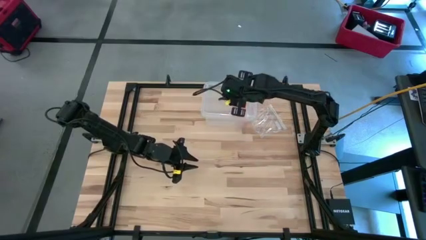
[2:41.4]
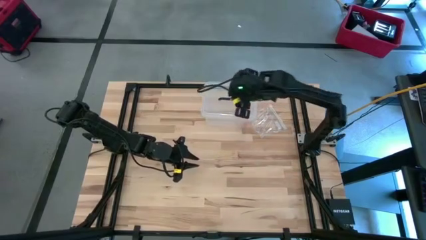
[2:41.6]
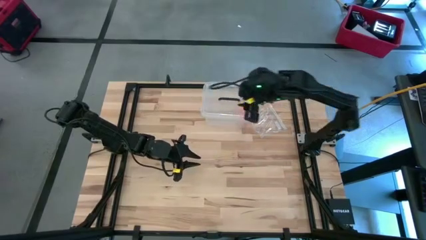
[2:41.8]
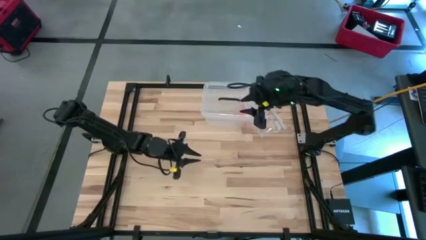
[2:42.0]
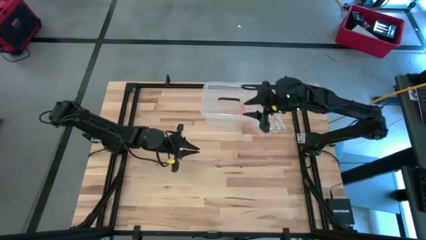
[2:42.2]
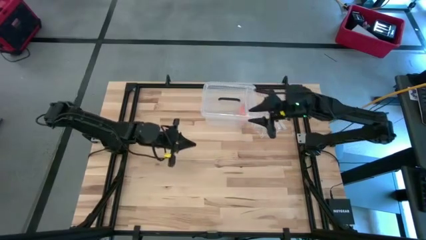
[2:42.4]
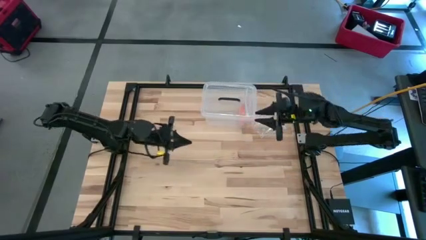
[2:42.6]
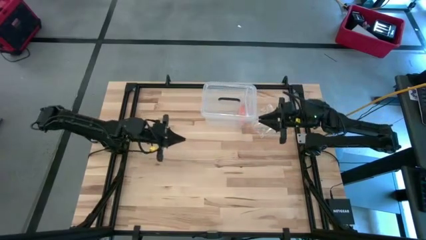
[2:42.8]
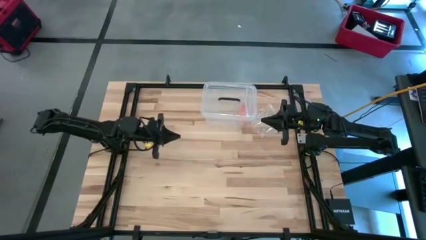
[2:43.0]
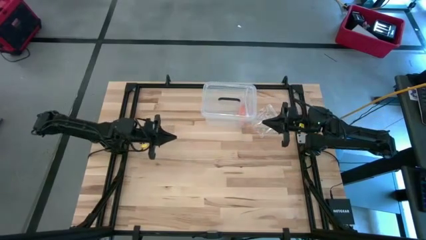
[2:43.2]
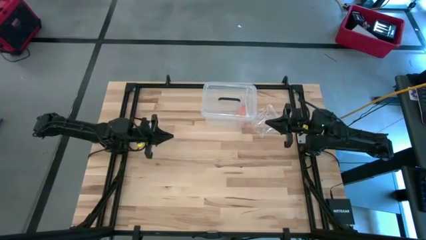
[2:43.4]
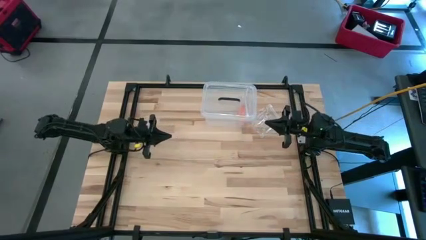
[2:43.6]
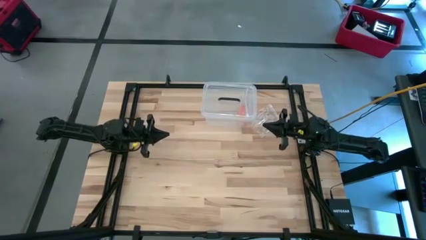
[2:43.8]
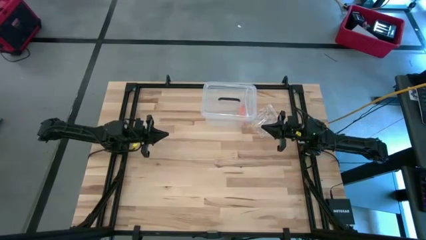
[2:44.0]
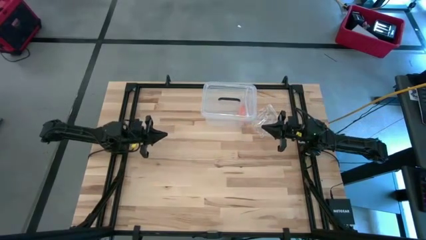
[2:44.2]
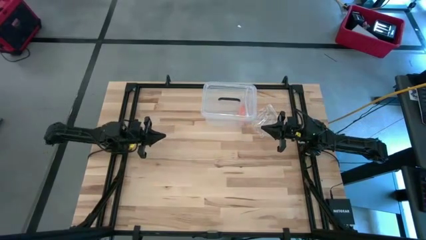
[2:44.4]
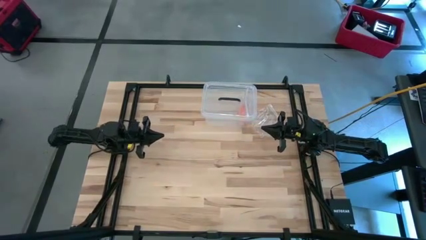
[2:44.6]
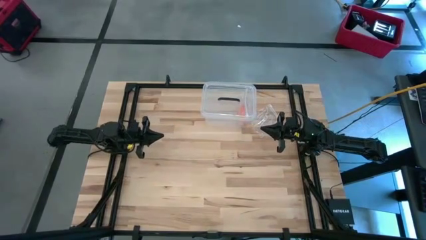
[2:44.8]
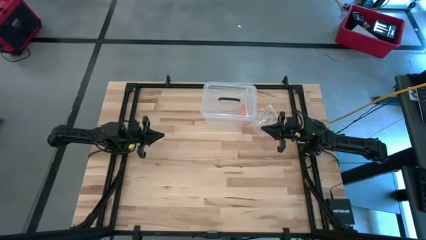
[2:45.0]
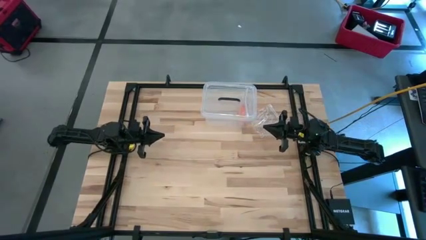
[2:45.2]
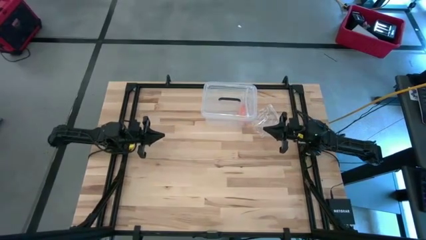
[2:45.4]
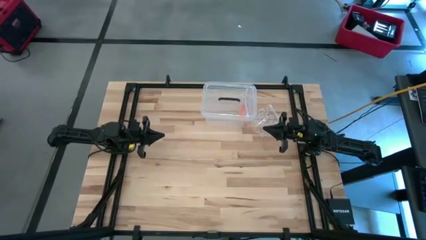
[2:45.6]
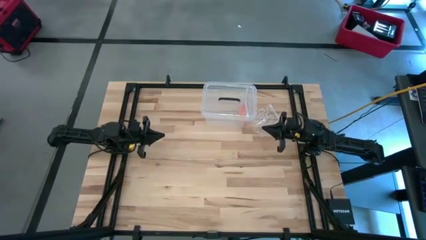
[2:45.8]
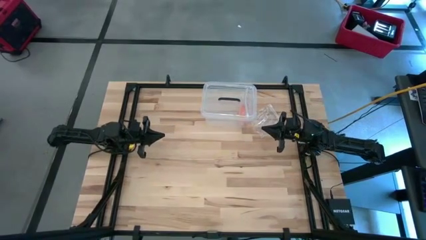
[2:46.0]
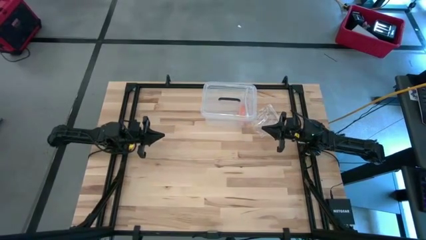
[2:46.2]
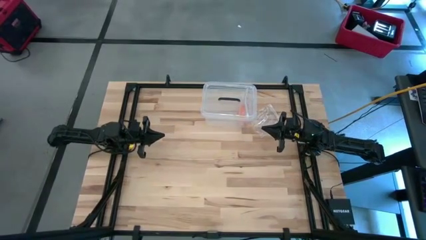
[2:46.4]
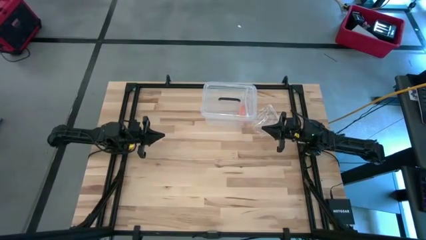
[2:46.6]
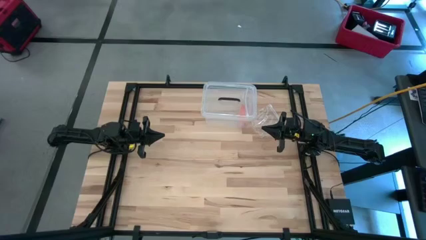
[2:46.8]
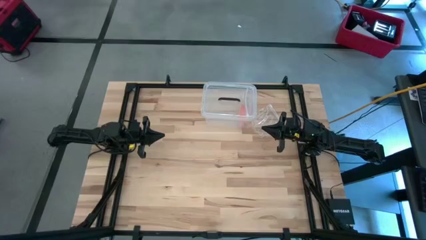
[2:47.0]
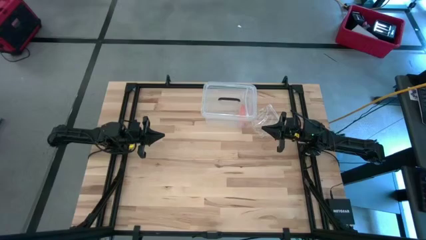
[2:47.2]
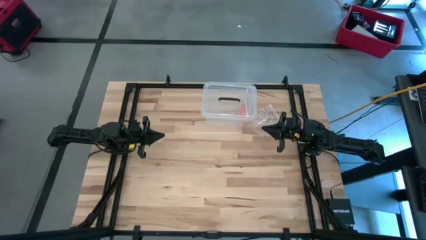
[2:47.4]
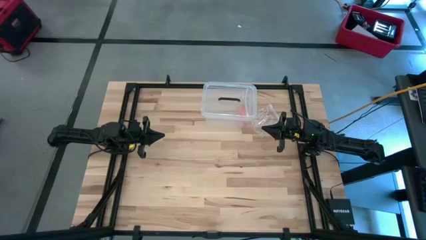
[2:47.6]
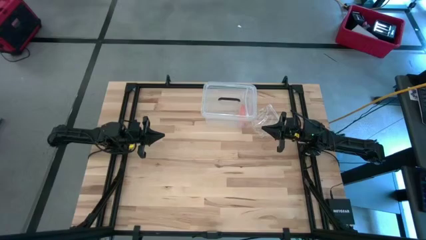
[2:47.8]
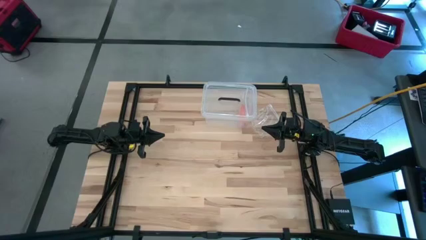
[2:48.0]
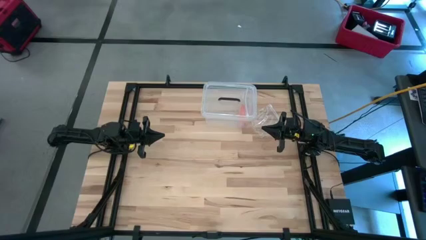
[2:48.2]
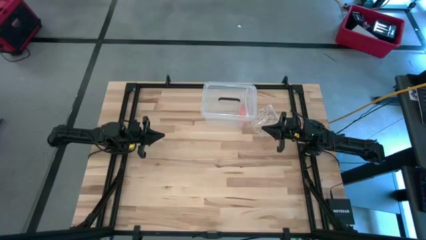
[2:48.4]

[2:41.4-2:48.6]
Task: Roll bandage
Return to Home Position

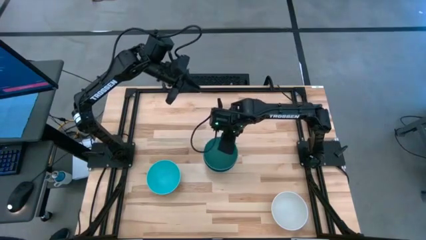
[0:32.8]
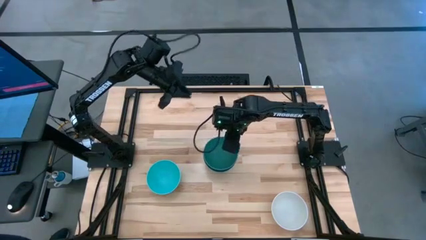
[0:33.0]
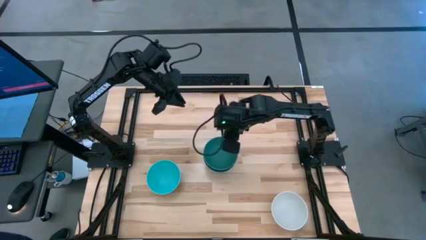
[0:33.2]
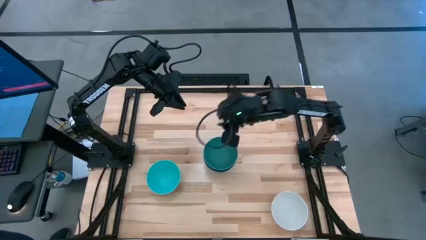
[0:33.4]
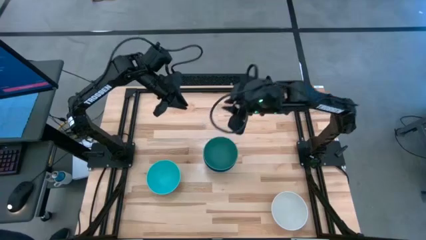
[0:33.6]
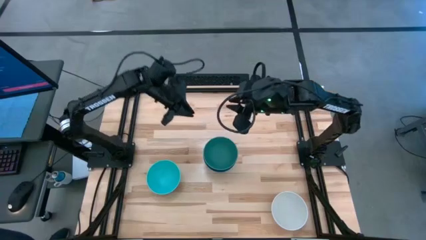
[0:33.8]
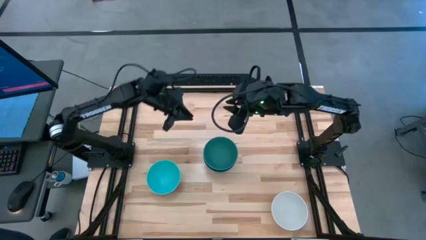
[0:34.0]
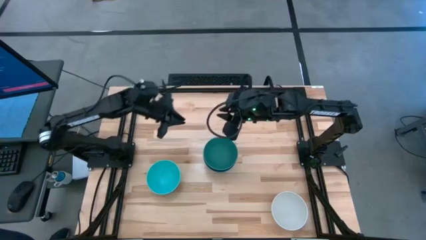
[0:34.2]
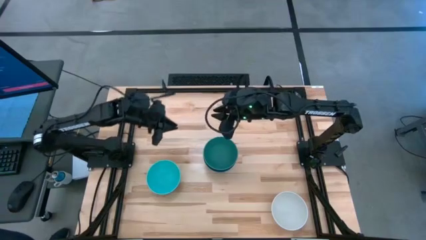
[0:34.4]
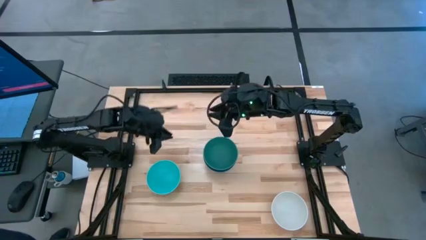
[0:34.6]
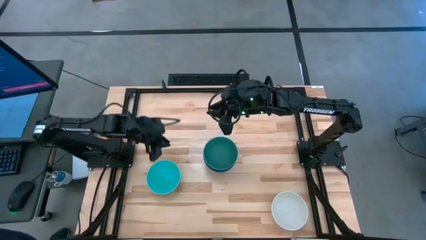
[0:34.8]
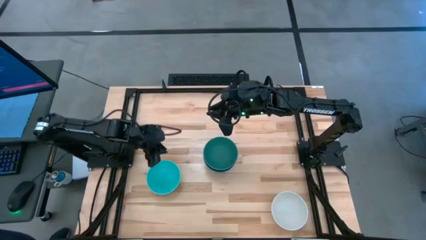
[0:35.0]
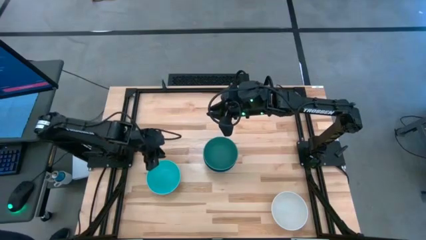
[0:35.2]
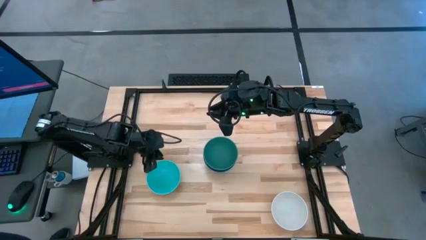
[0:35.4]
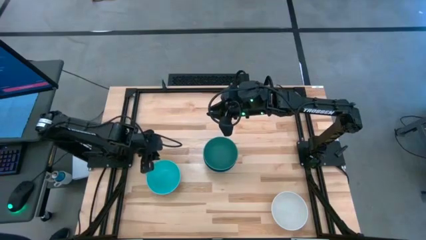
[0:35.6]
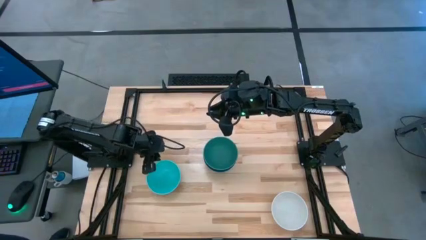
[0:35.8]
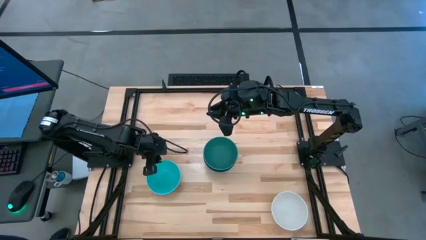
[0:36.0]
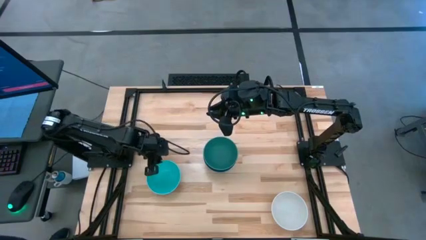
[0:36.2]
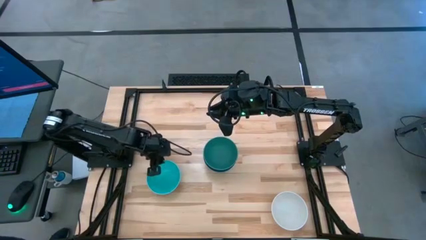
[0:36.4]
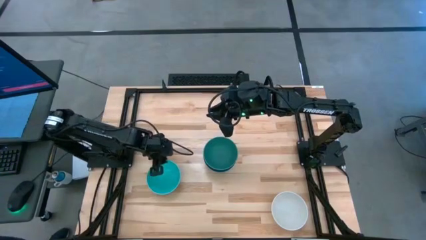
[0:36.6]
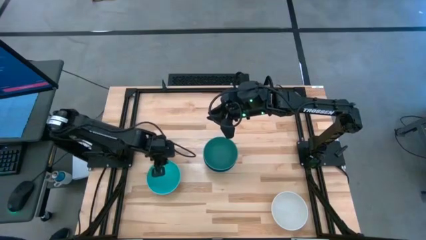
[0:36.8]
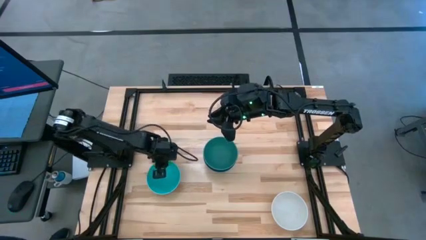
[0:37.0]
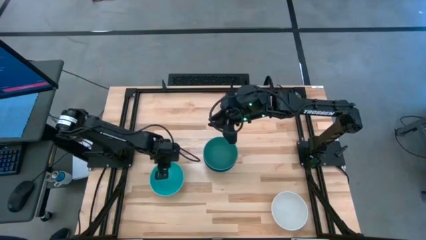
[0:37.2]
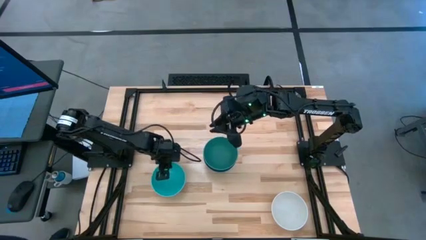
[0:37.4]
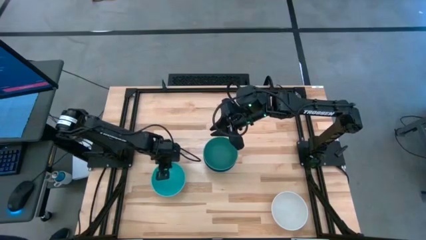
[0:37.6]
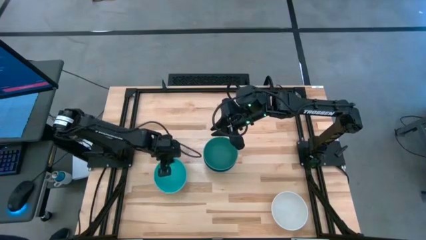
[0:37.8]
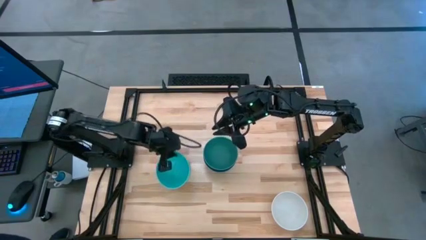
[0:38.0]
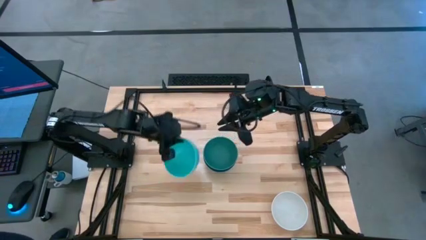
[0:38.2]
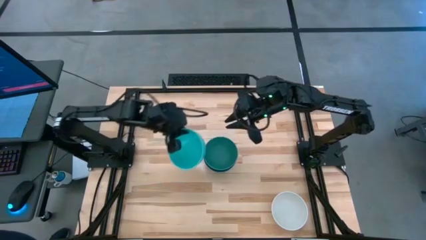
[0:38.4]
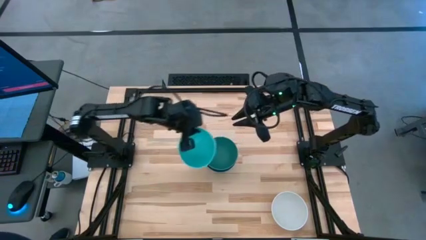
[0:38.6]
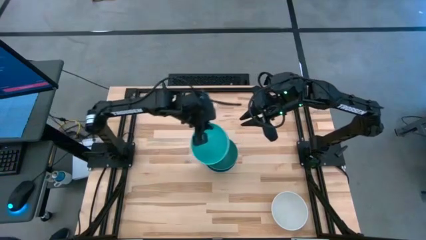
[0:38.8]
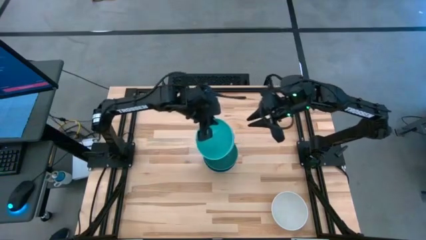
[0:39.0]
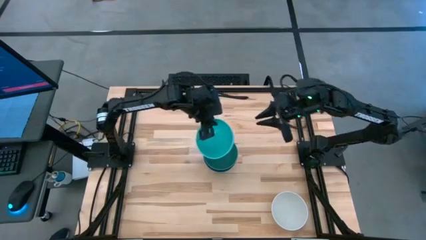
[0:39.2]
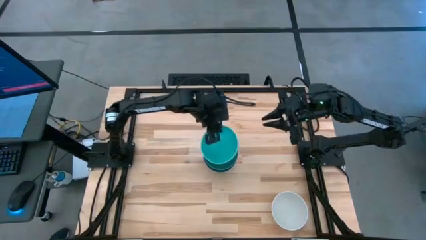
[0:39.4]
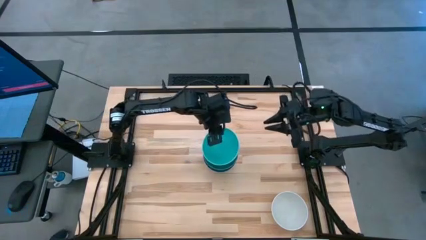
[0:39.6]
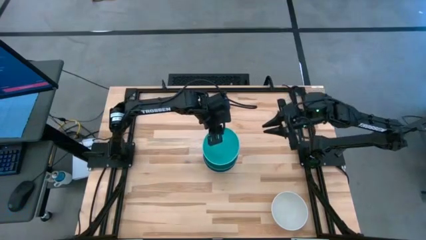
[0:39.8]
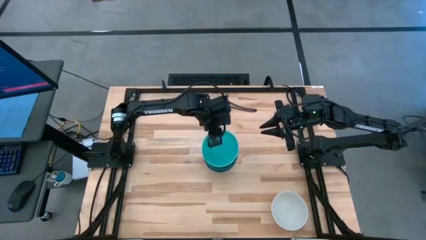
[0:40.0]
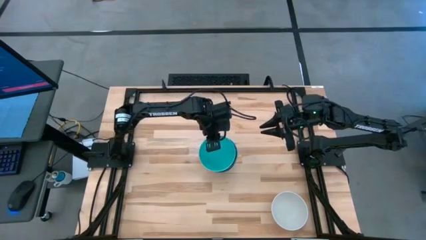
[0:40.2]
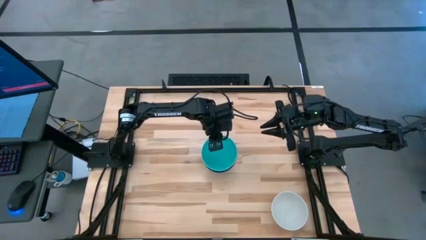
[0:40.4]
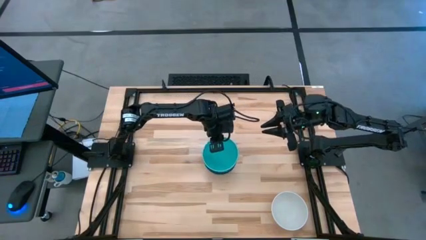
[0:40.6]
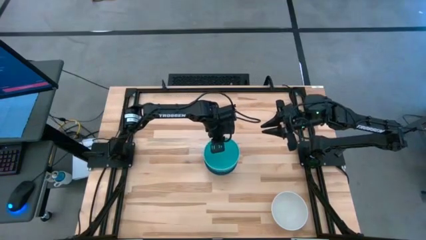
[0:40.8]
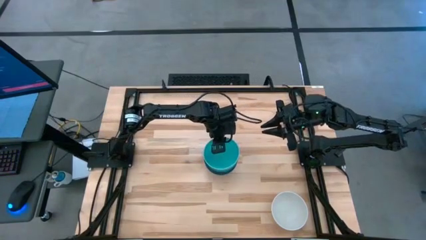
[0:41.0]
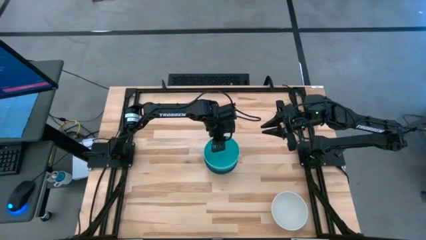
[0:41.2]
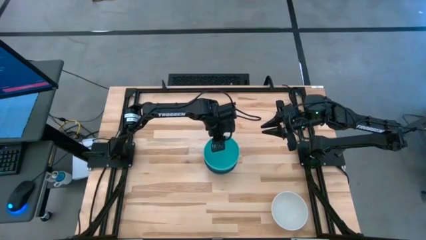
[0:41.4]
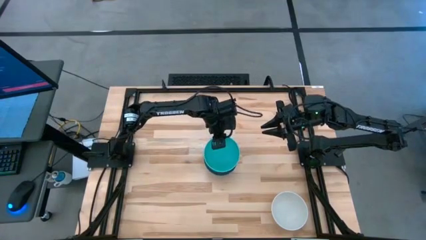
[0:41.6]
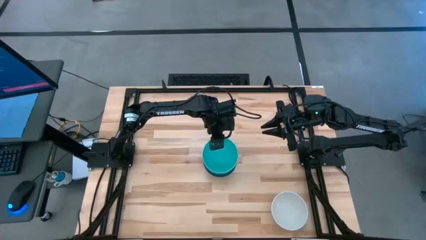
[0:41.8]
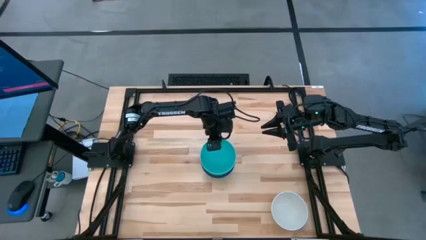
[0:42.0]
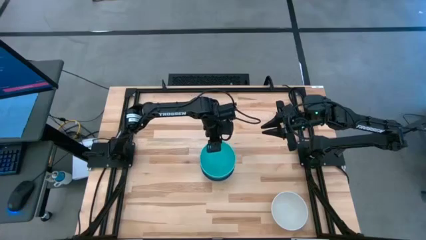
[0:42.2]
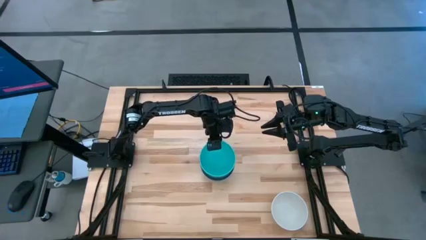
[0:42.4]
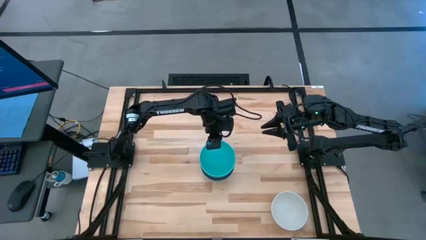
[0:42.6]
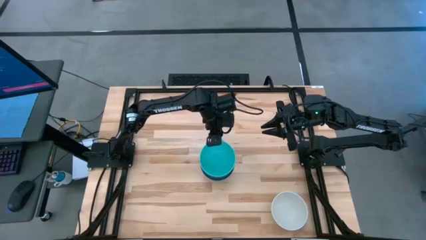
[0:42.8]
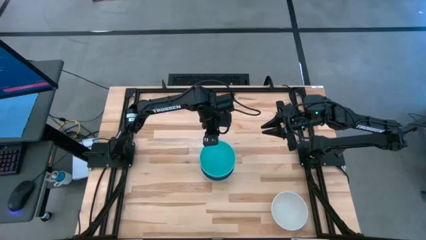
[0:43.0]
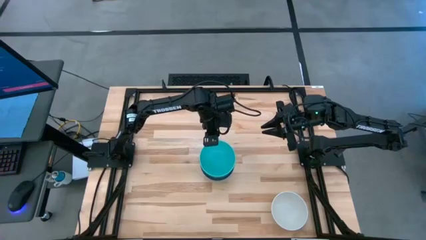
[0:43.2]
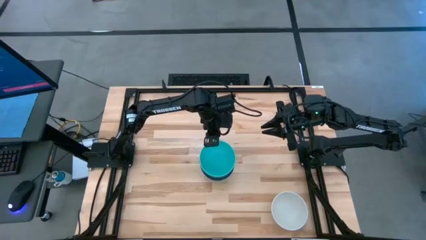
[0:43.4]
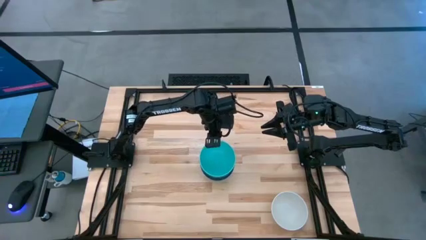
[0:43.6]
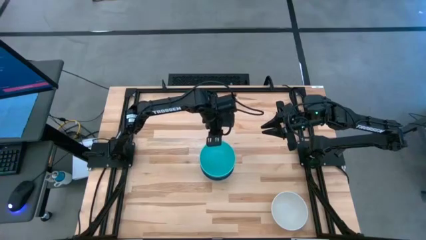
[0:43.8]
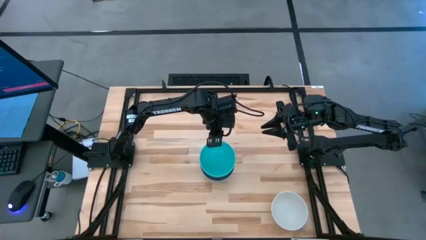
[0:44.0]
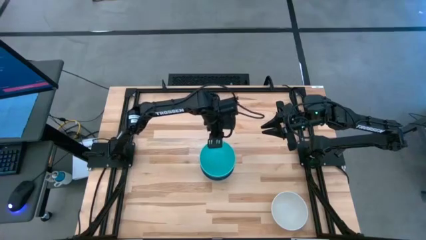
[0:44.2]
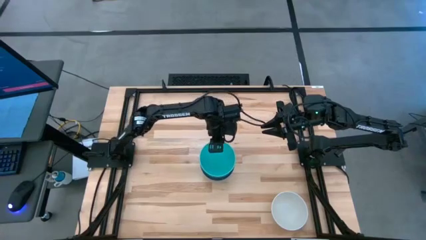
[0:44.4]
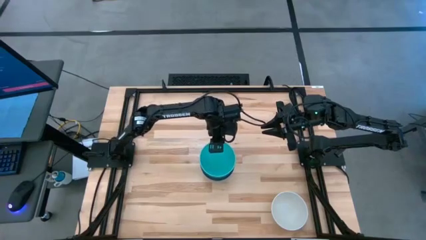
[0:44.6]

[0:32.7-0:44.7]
Task: Nest bowls inside each other
Stack the light blue bowl on the green bowl
